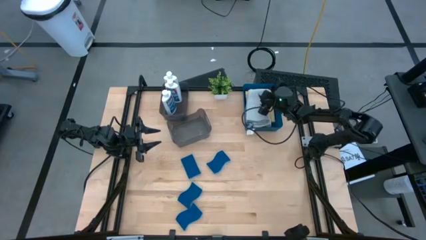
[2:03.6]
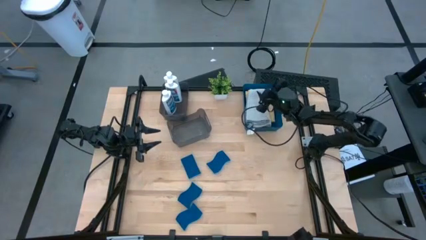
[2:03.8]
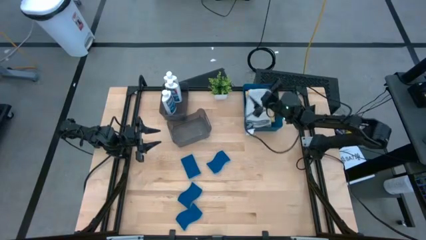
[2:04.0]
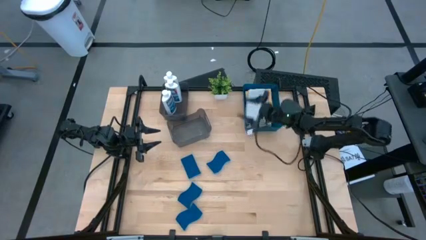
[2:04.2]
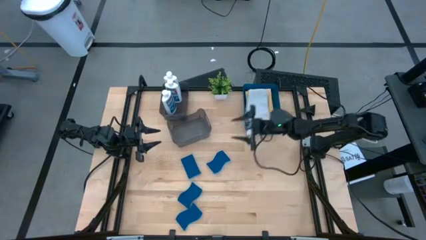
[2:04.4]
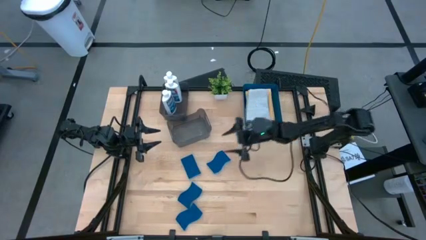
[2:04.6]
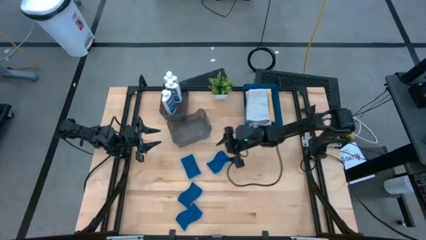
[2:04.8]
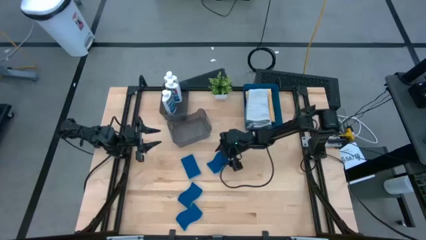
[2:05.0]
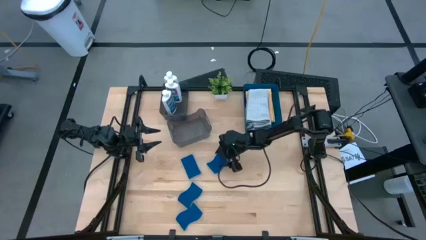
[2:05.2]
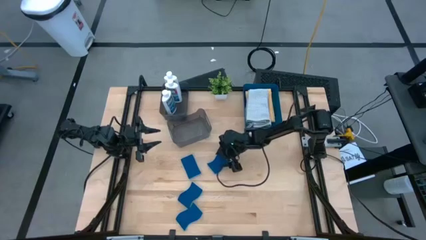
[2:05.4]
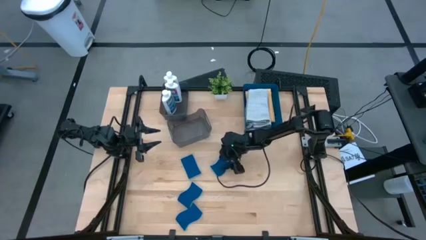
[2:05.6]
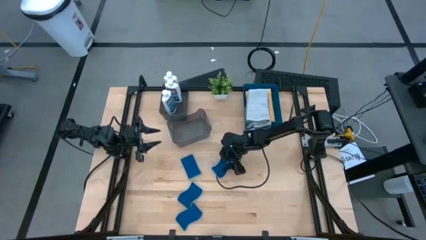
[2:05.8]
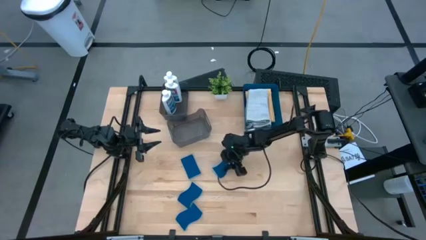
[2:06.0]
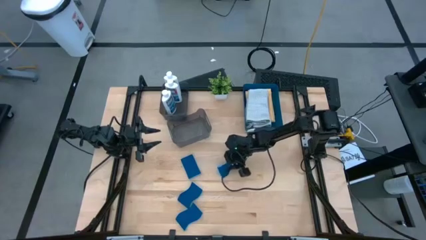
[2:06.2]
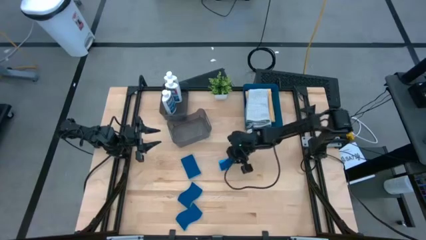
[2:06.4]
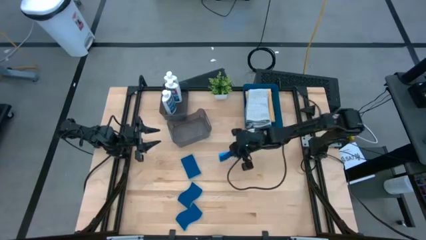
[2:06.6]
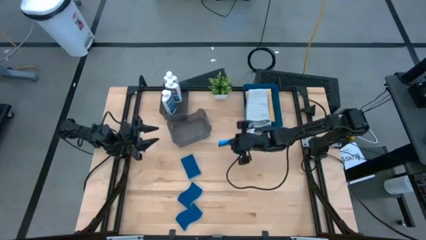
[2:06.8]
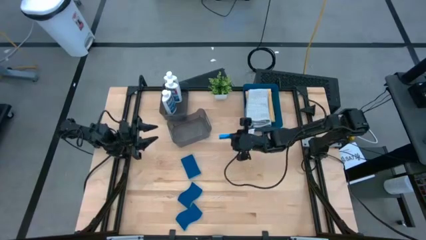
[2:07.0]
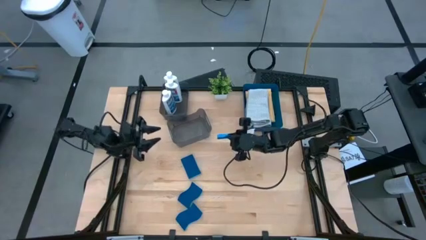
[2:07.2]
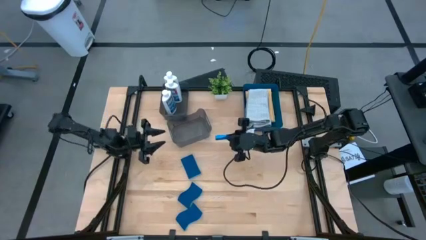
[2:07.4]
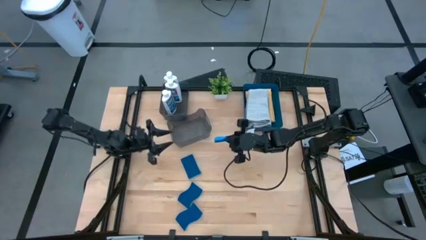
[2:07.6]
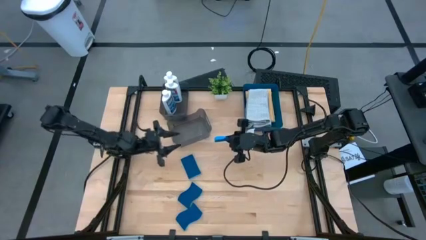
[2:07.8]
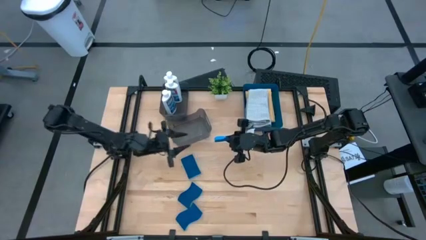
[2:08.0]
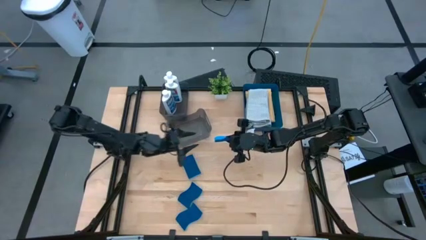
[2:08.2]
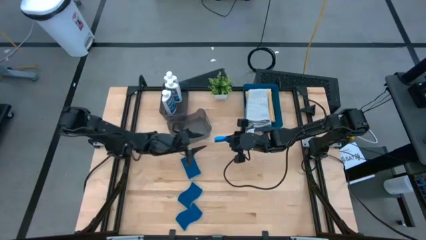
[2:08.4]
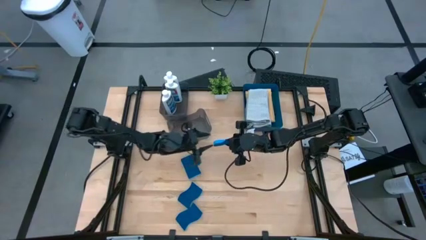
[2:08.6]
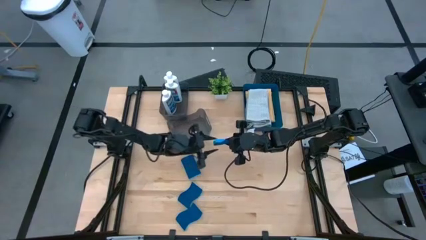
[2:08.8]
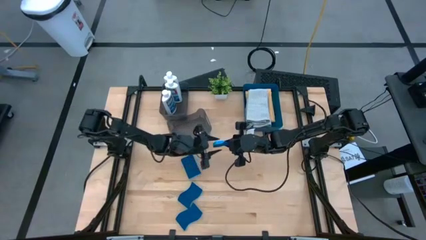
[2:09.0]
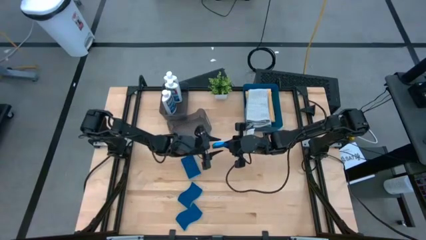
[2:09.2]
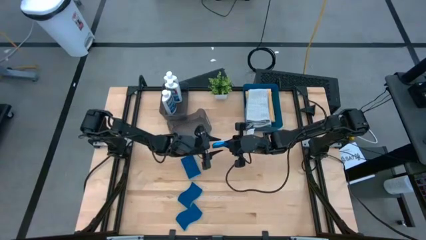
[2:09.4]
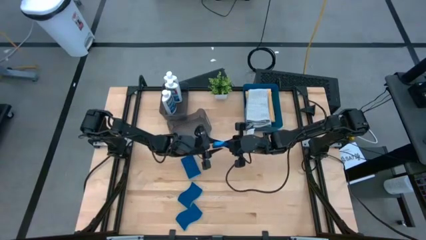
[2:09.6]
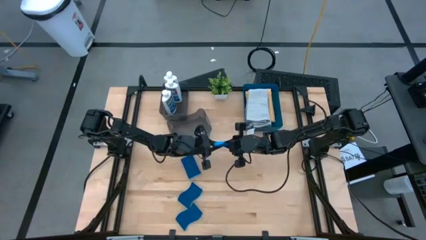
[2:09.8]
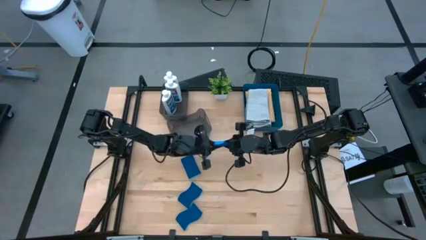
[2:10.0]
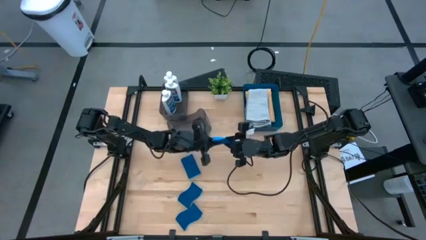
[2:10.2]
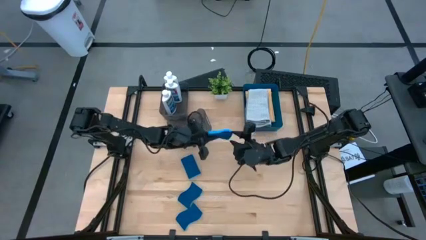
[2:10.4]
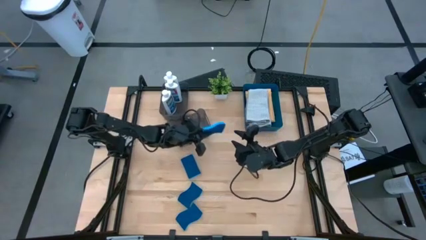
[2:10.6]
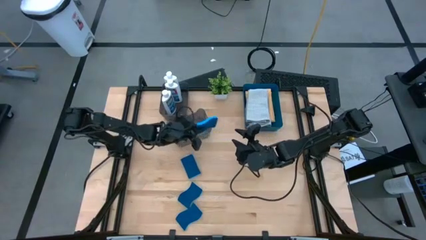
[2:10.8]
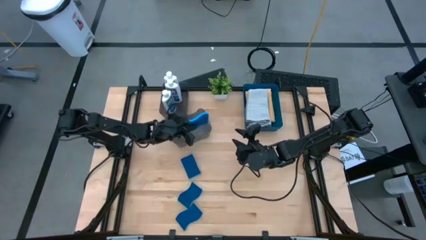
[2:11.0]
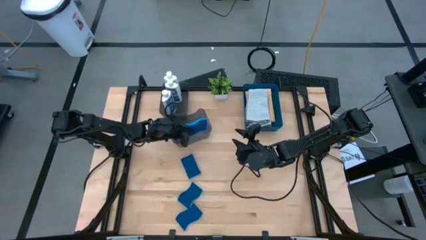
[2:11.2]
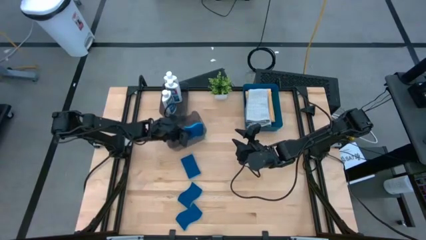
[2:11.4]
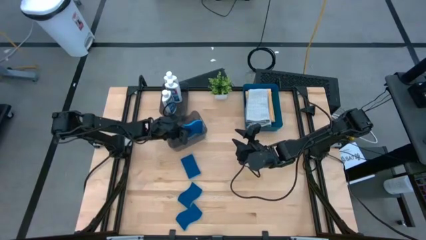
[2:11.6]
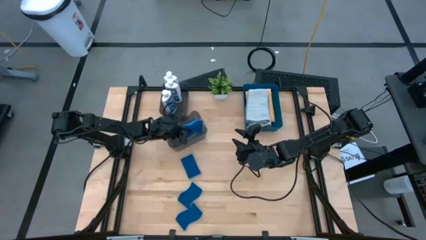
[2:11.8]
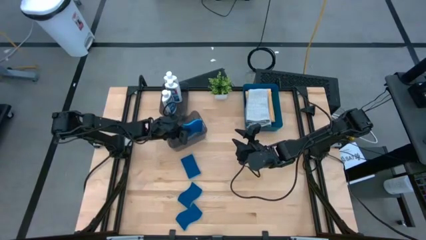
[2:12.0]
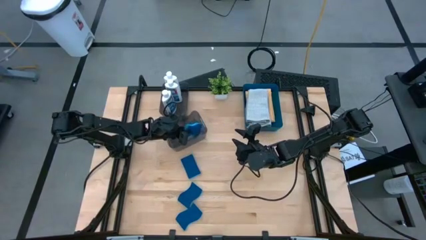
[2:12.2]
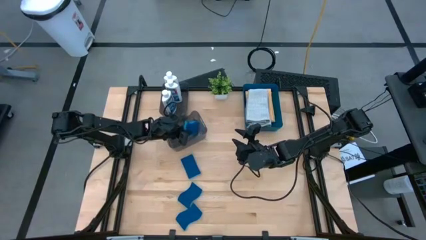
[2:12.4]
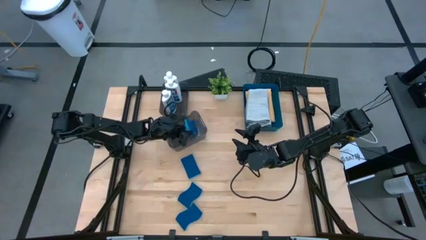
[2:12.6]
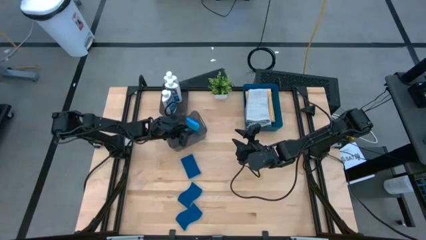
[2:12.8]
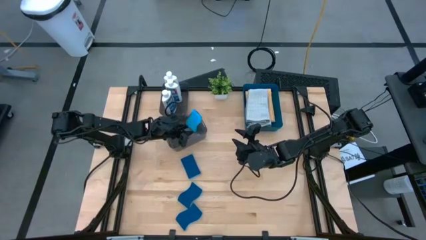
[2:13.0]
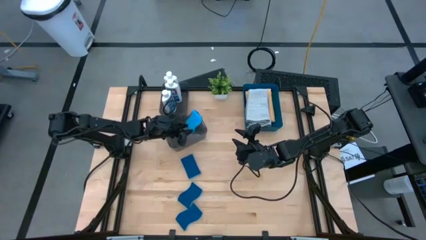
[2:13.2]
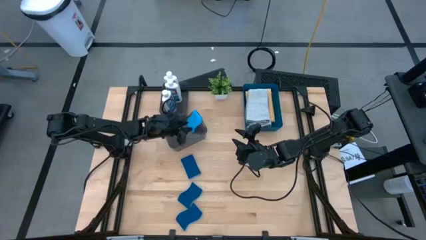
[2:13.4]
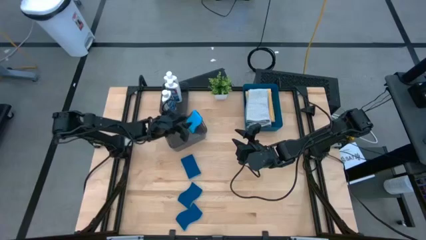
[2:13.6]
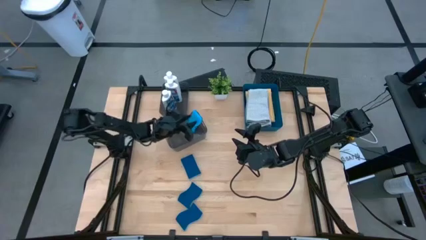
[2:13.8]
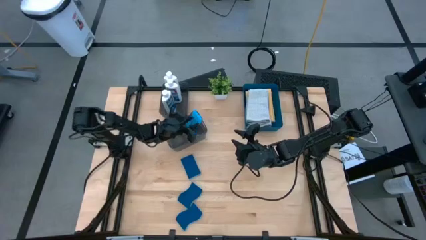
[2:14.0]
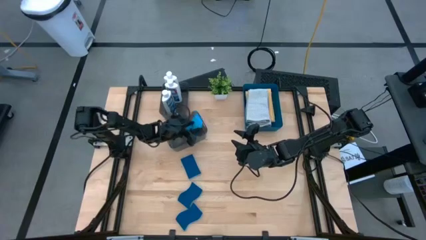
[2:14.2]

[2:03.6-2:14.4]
Task: Pick & Place Kitchen Items
Put the blue sponge into the bottom black bin

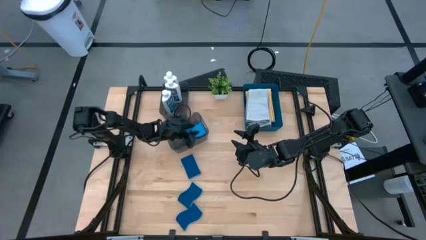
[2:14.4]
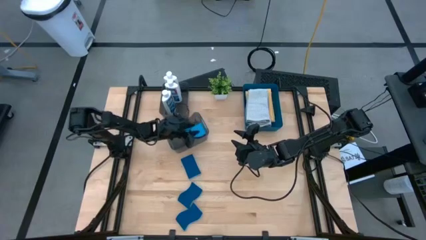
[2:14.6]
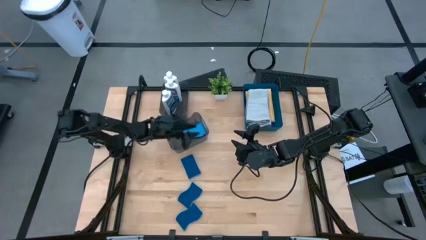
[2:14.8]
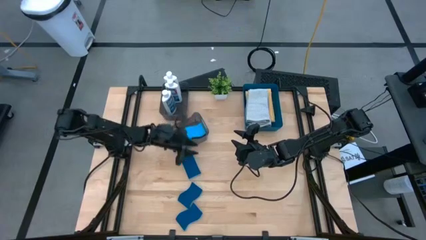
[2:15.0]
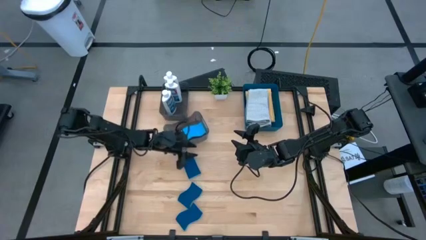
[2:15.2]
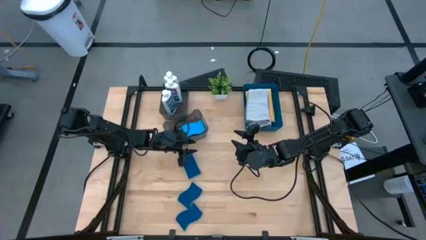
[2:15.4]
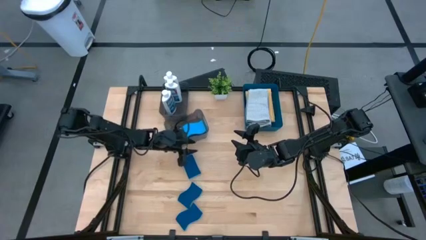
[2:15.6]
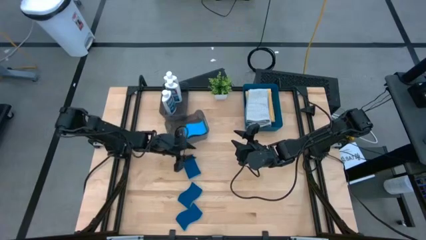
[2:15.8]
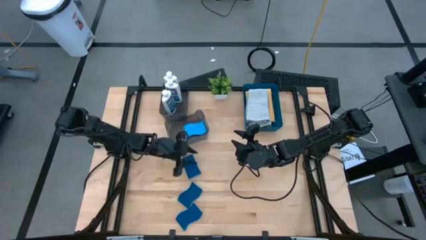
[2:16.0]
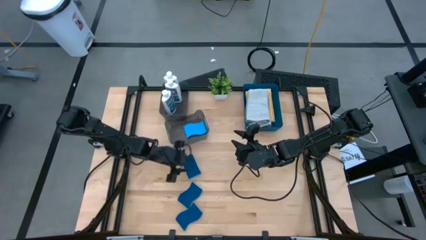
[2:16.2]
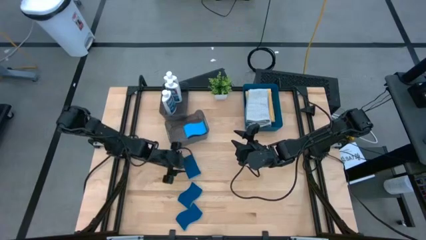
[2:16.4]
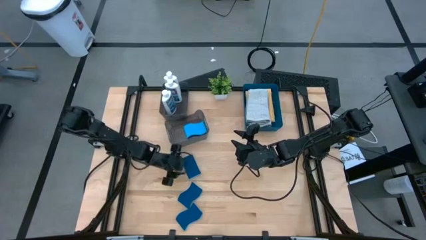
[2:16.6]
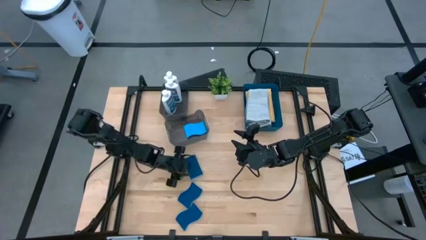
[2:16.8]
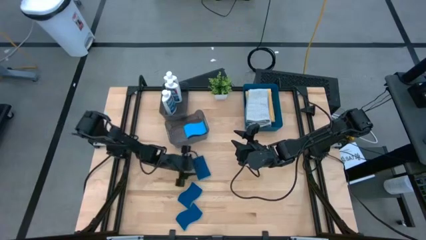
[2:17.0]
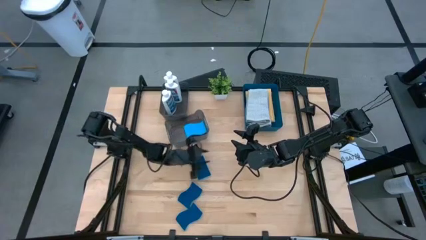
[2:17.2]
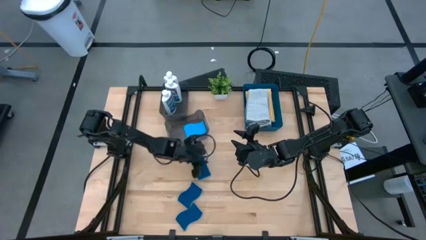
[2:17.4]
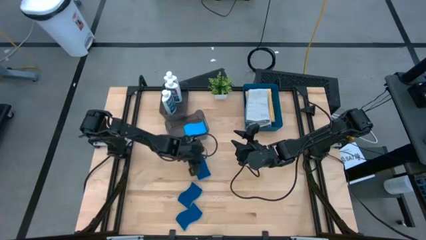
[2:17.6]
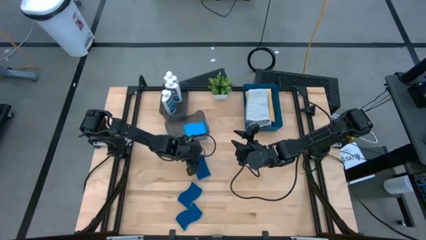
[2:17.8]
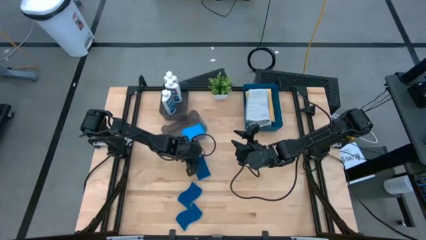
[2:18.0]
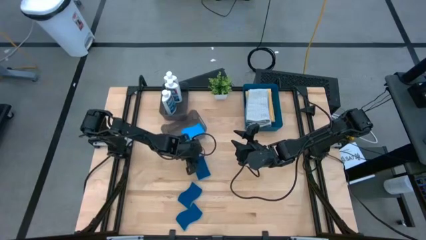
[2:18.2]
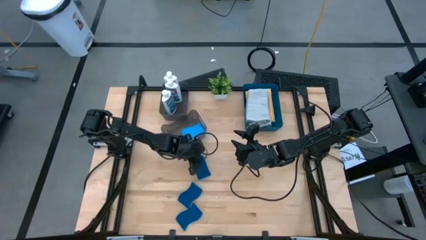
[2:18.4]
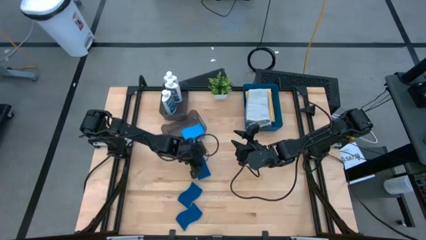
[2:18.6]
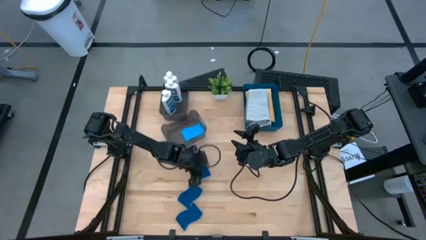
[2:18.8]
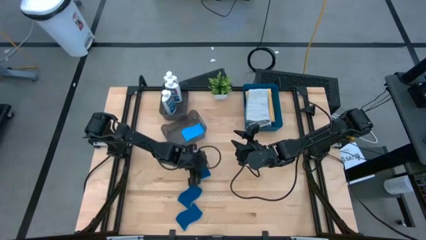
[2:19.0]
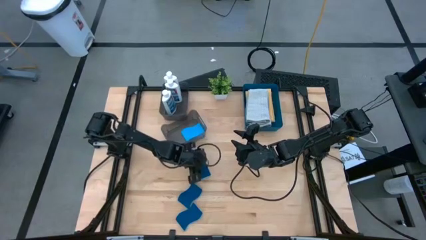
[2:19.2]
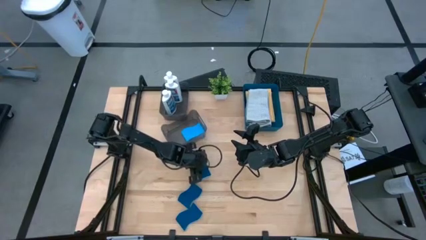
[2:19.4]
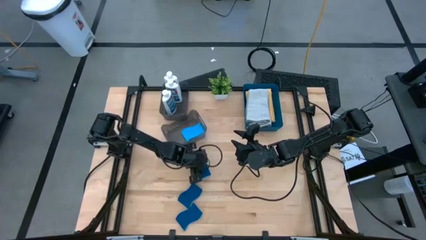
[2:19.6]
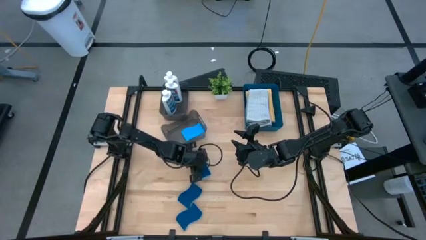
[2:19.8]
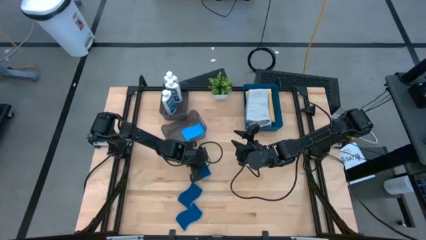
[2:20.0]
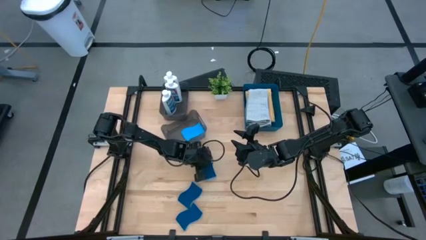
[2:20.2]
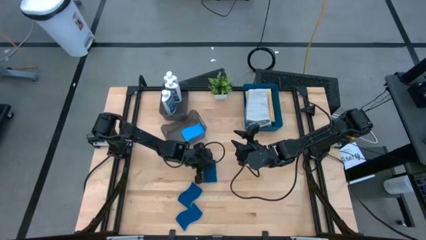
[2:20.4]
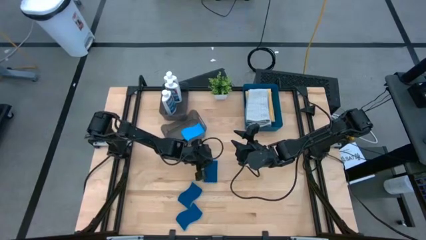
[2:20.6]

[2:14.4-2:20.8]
Put the blue sponge into the bottom black bin
